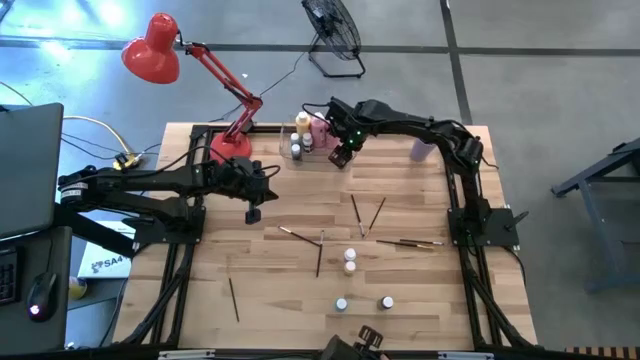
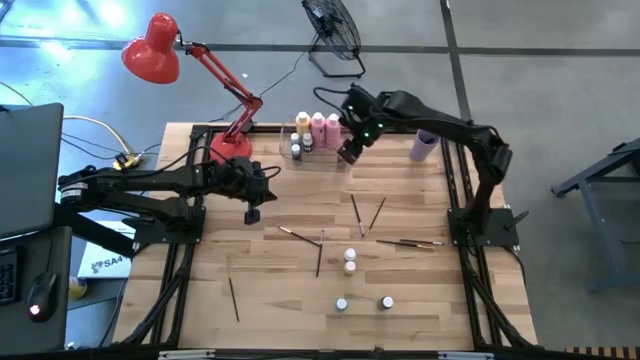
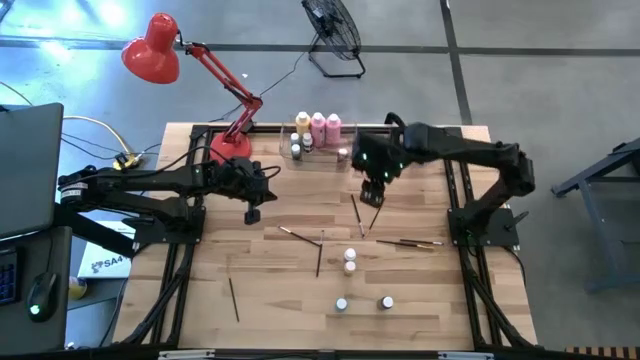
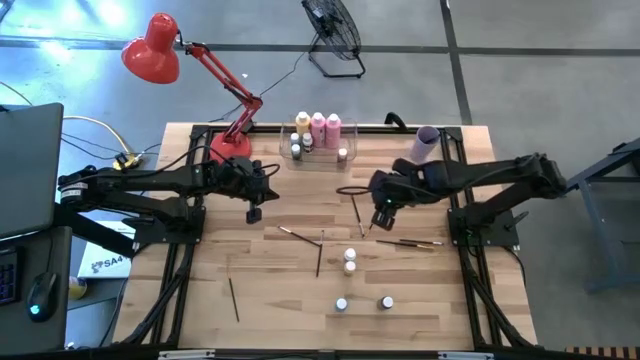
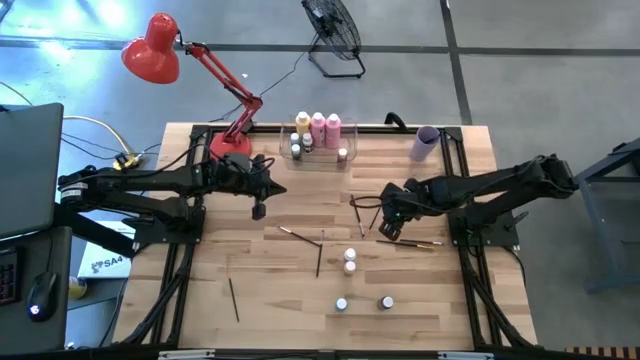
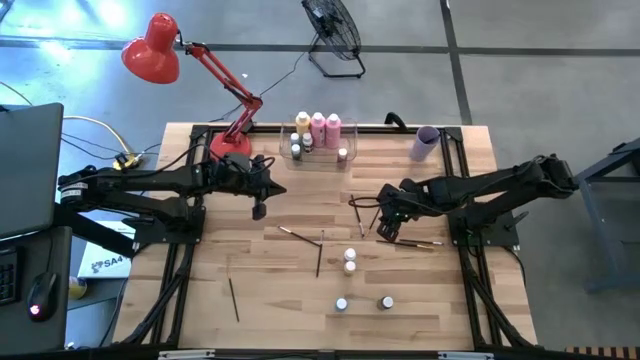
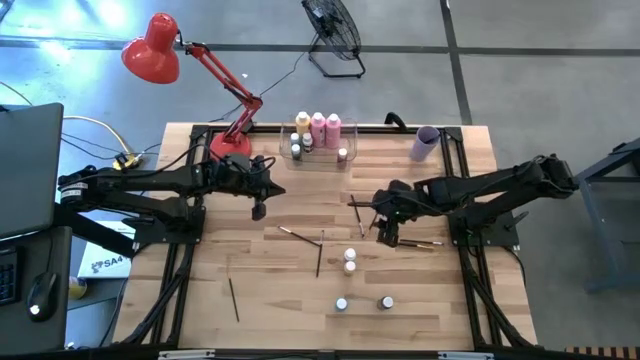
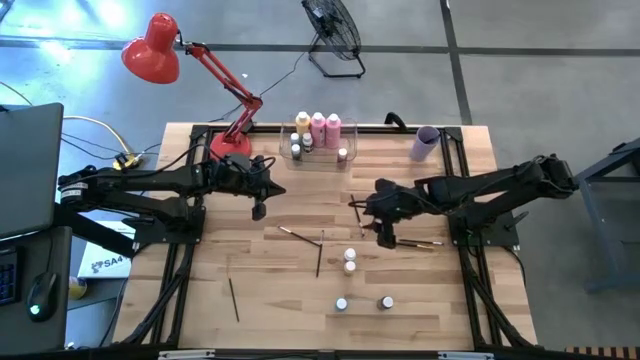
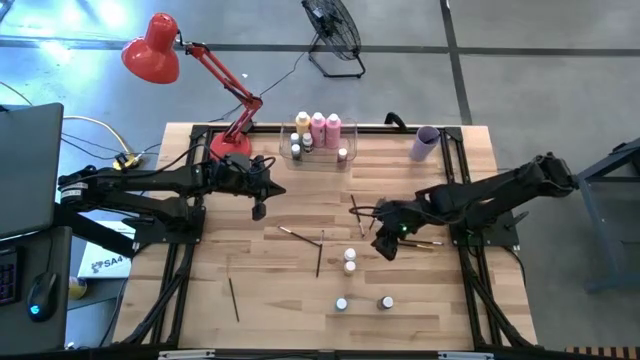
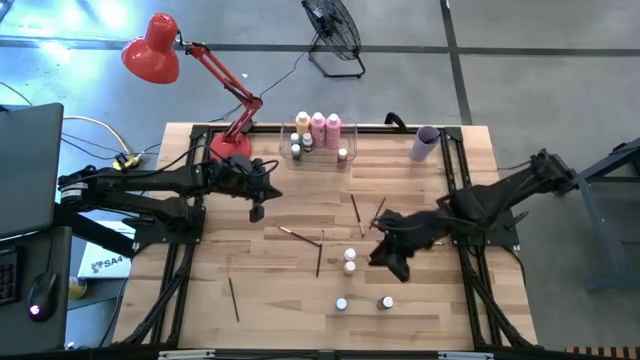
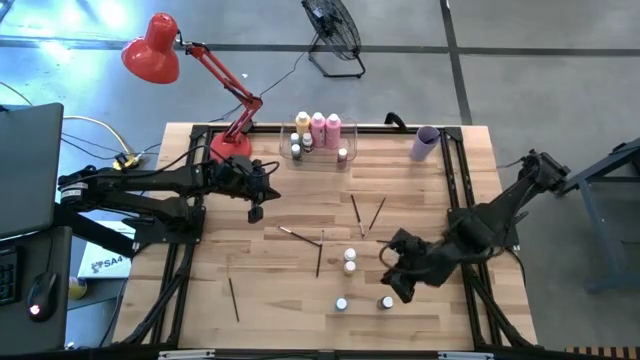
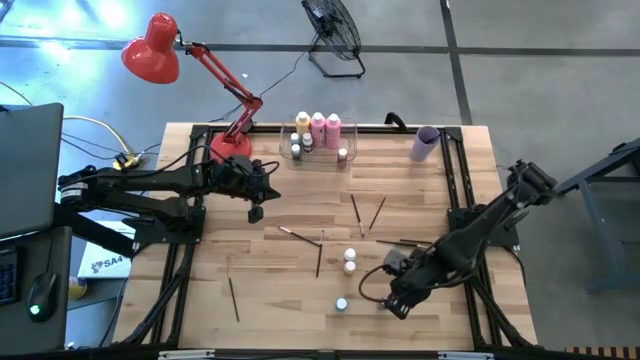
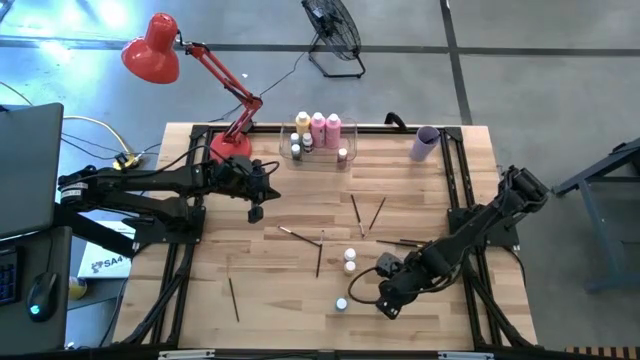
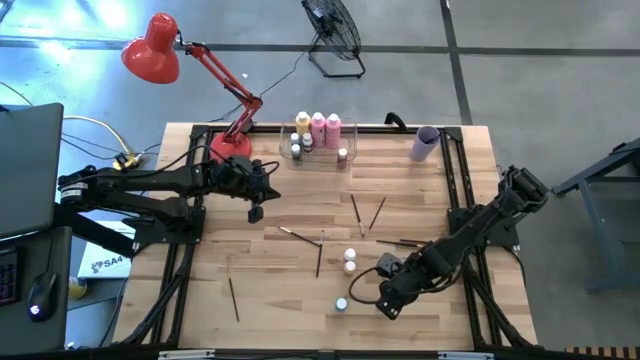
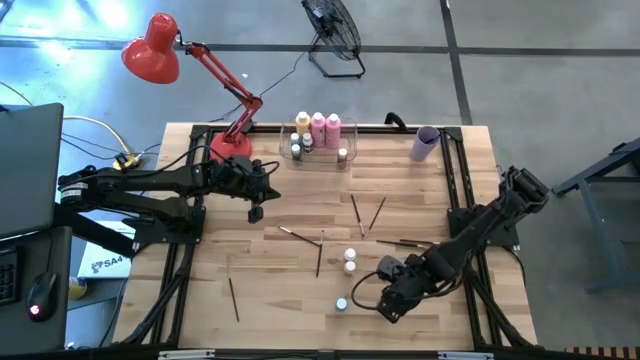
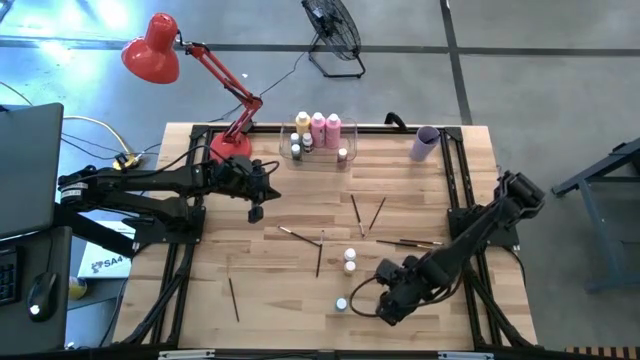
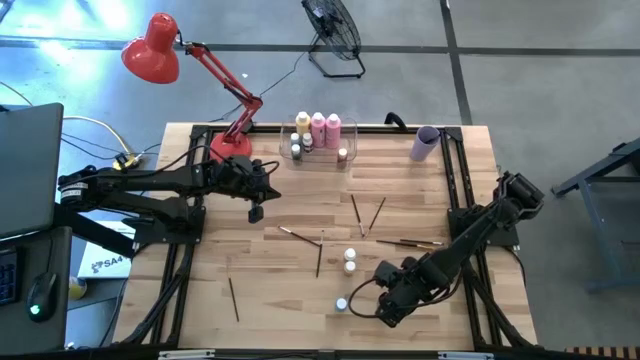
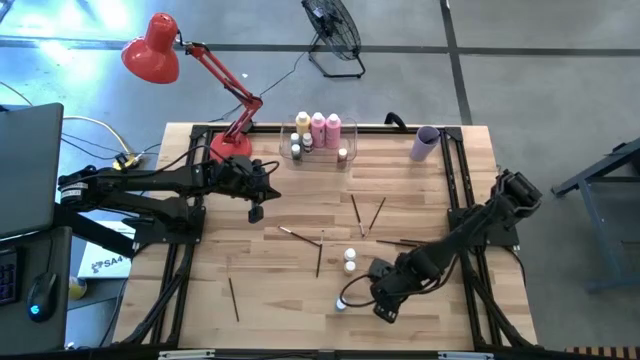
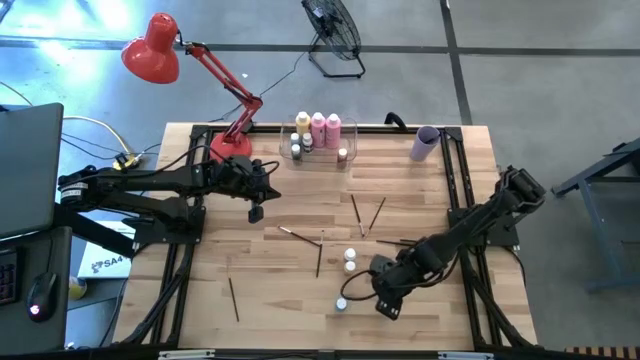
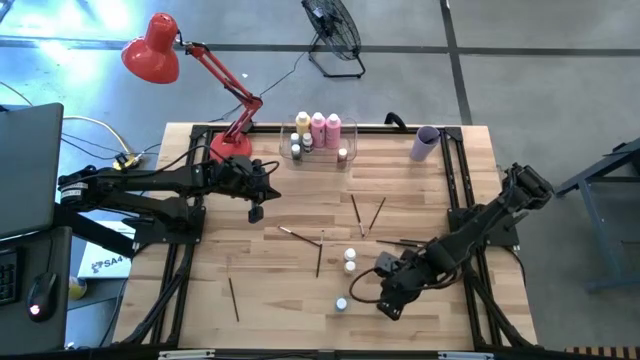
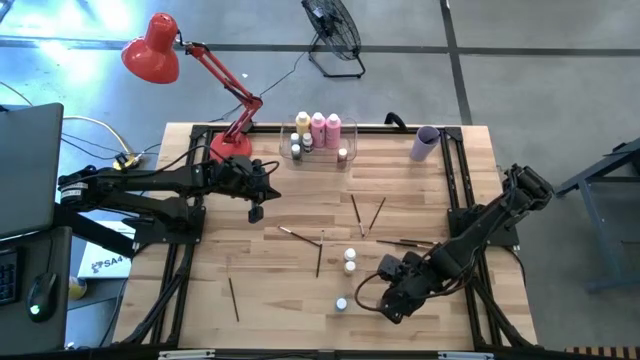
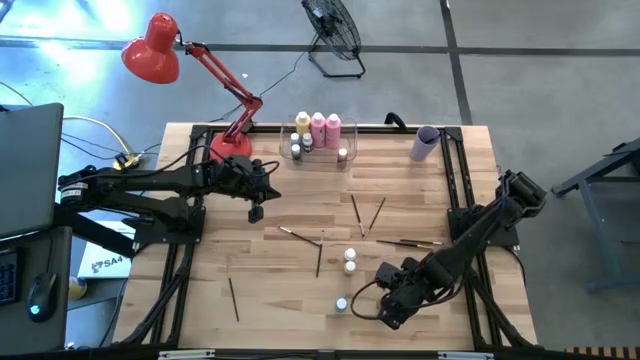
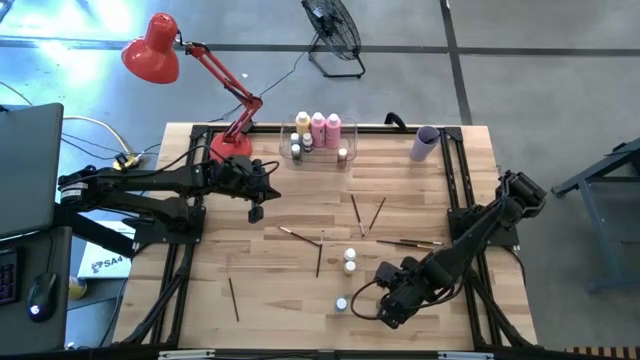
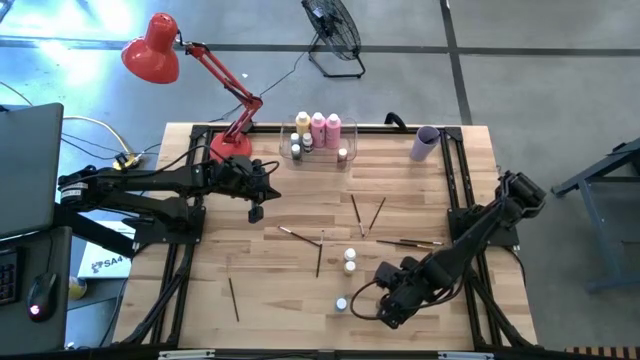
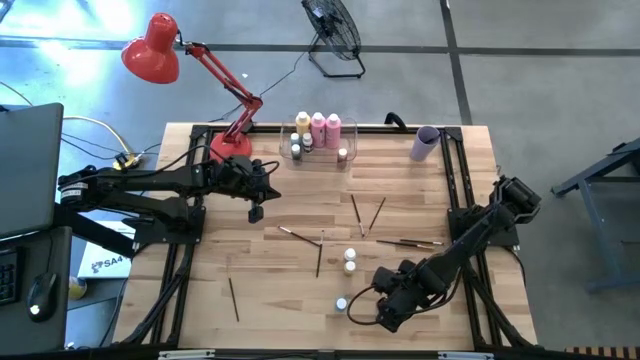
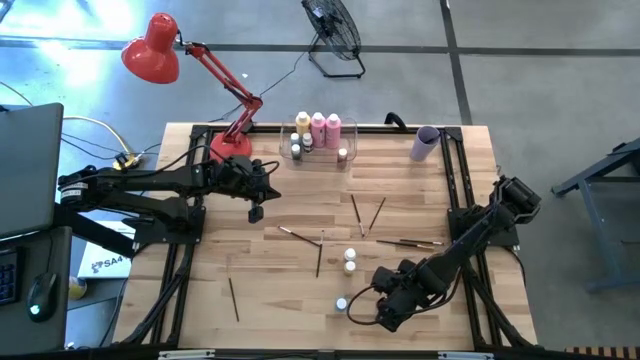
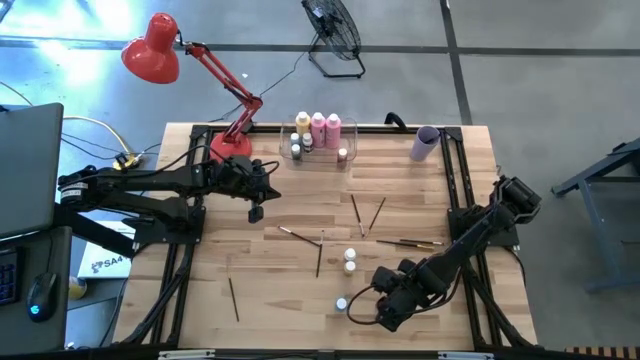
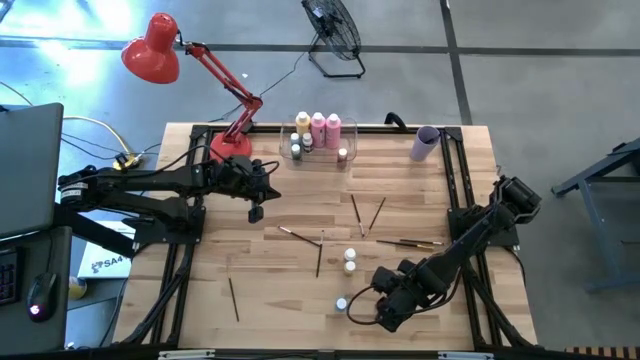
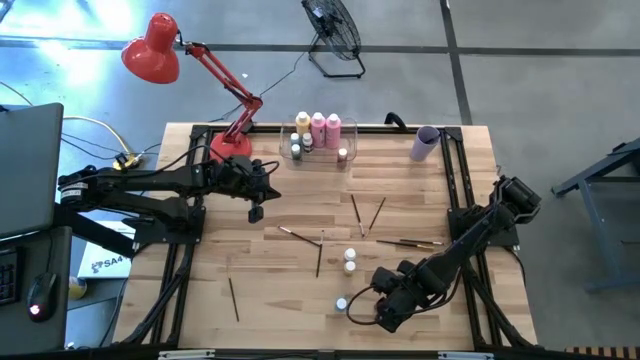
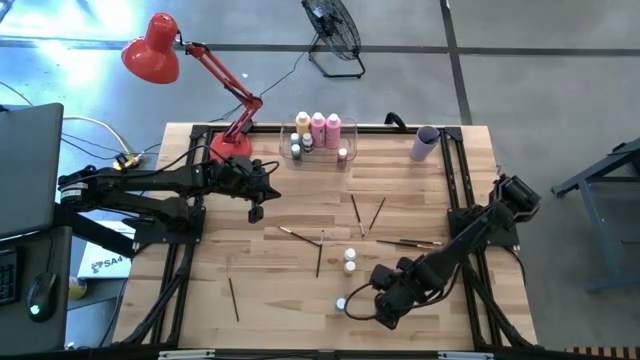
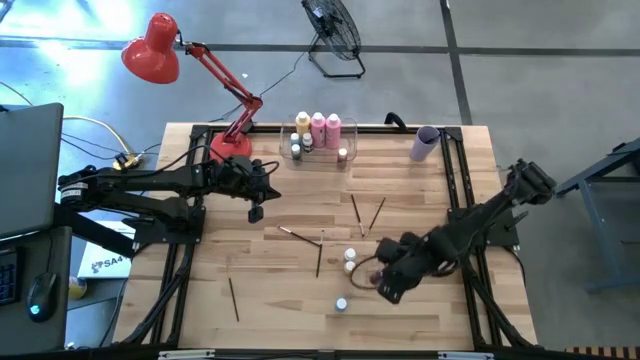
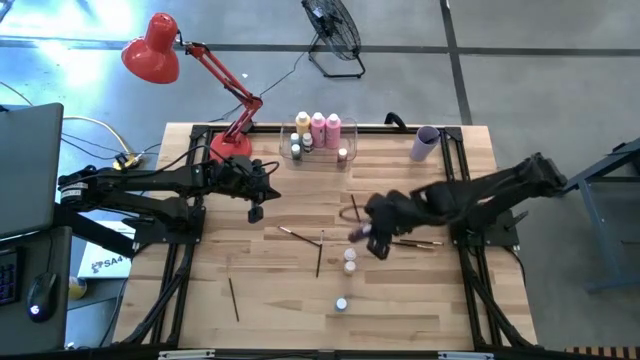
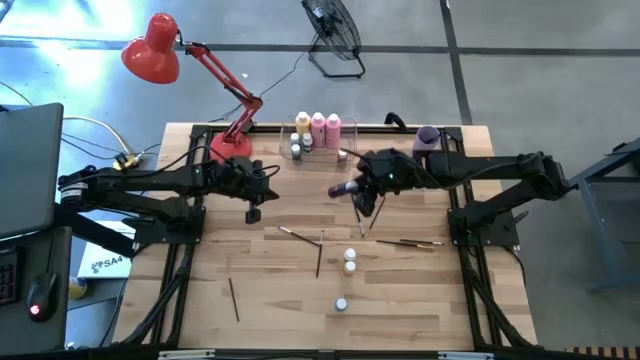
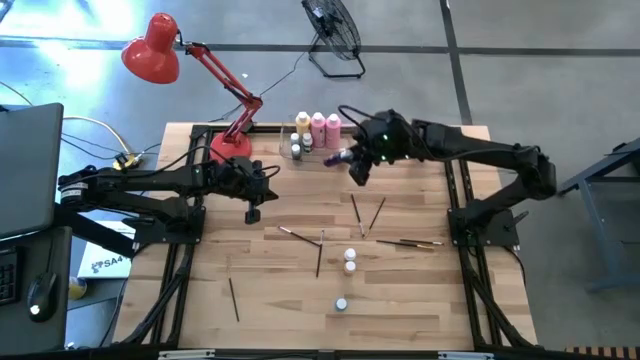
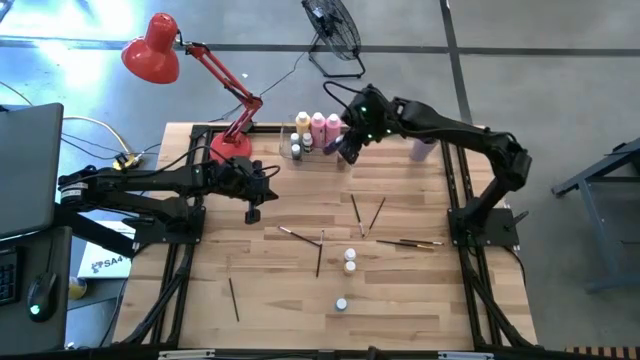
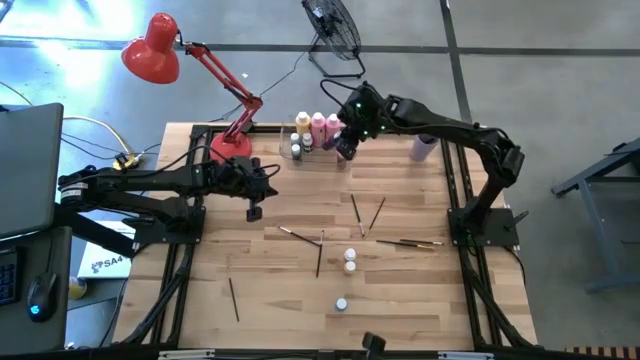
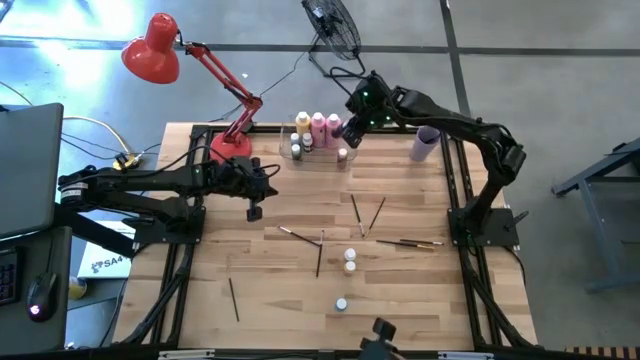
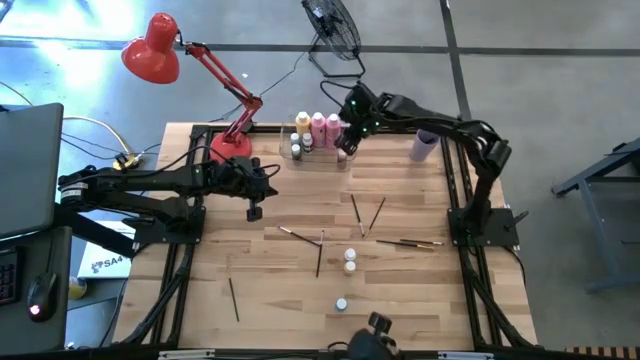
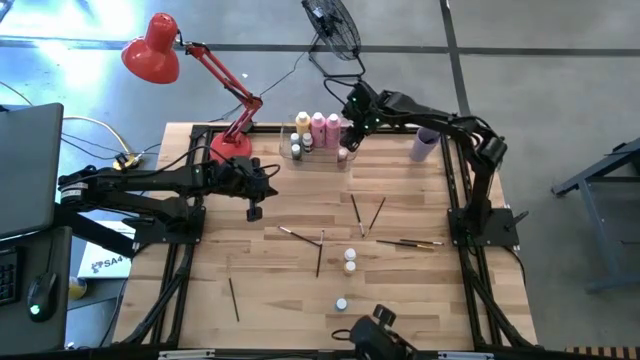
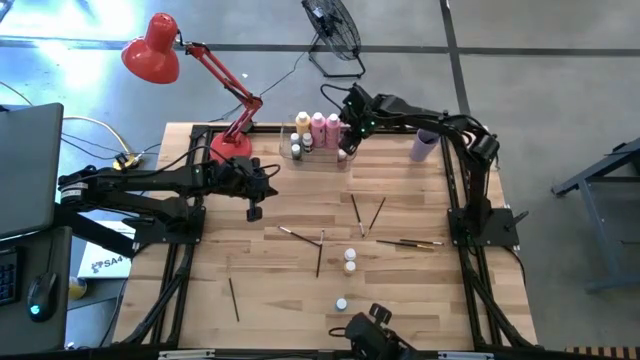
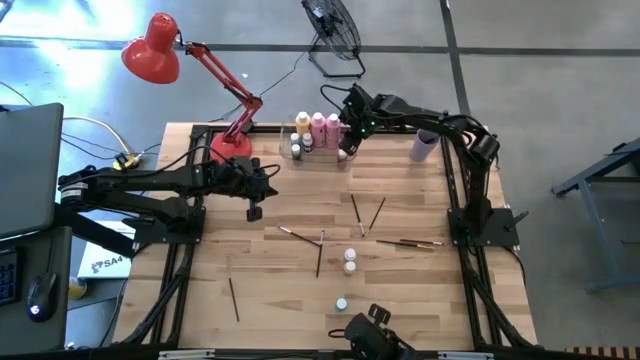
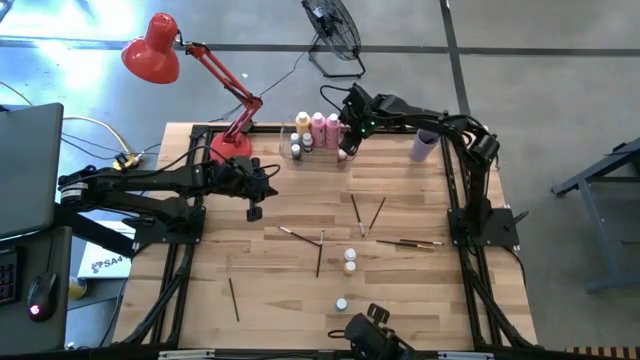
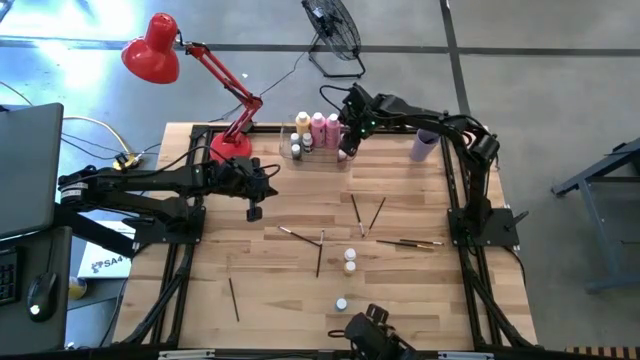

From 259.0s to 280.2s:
Task: Pick & Place Paint Supplies
Put the small blue paint bottle into the transparent bin
